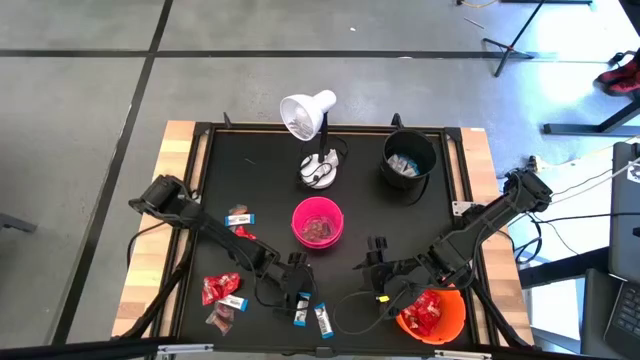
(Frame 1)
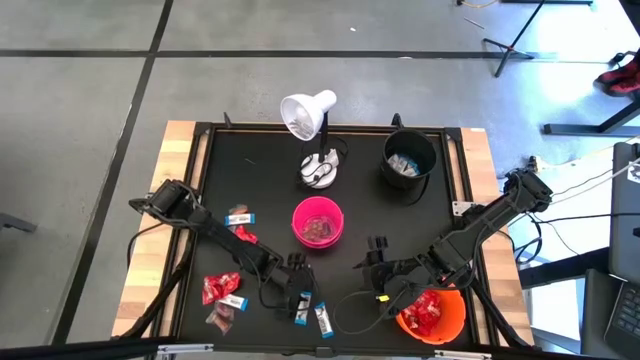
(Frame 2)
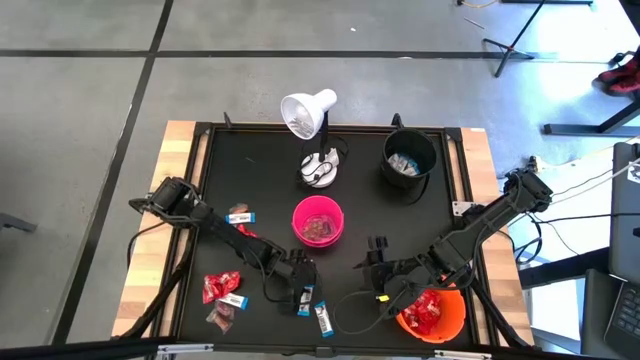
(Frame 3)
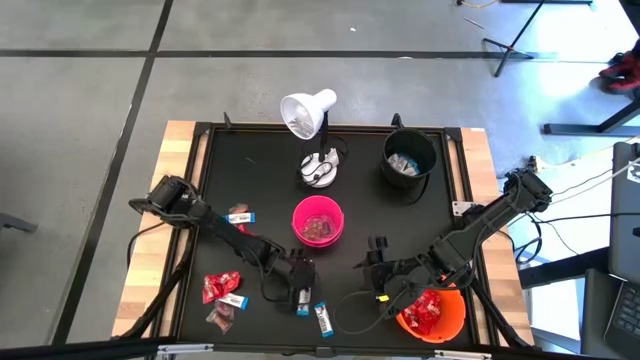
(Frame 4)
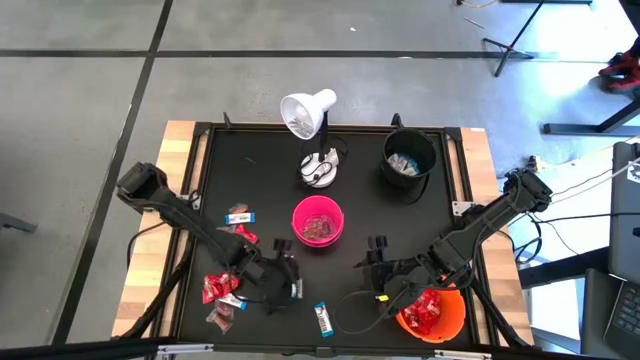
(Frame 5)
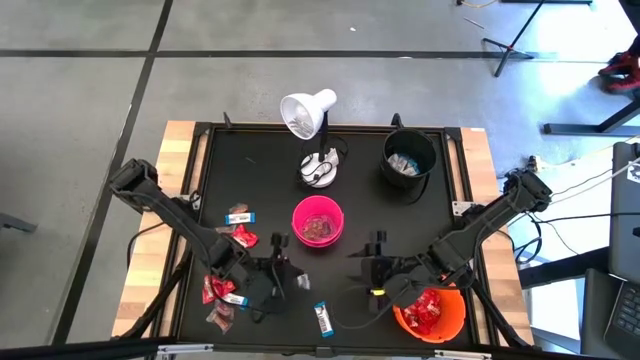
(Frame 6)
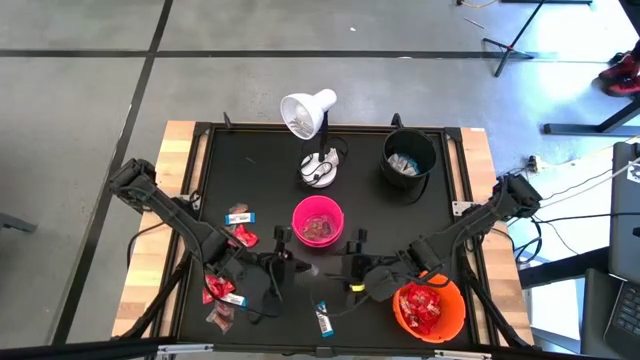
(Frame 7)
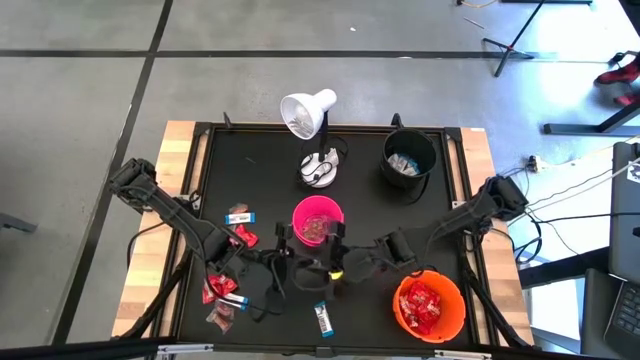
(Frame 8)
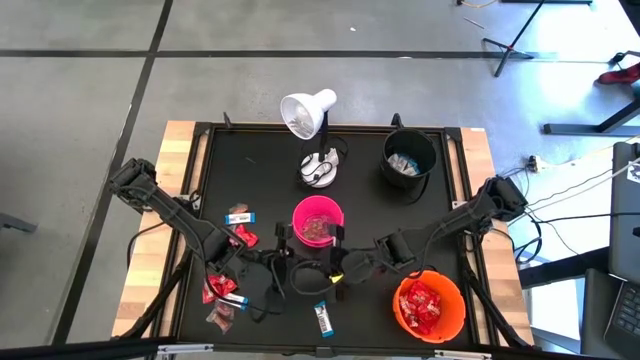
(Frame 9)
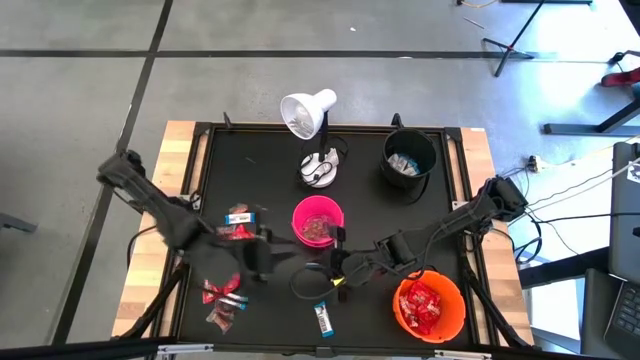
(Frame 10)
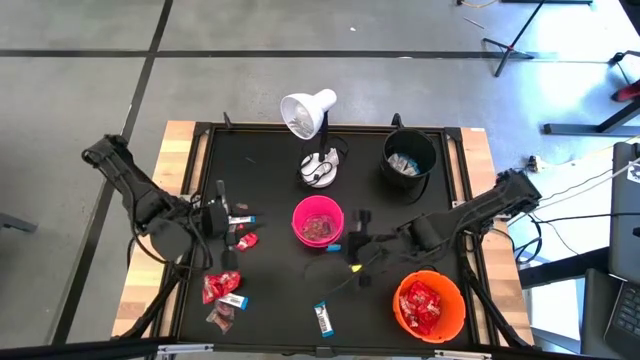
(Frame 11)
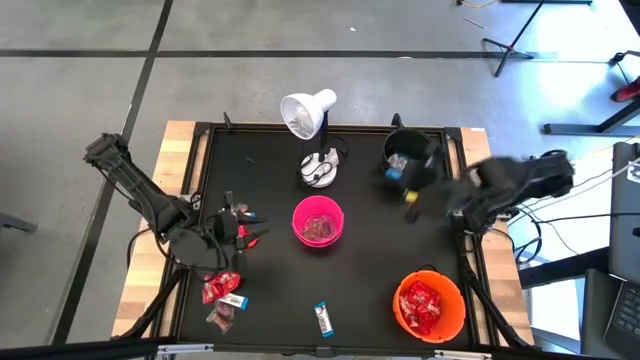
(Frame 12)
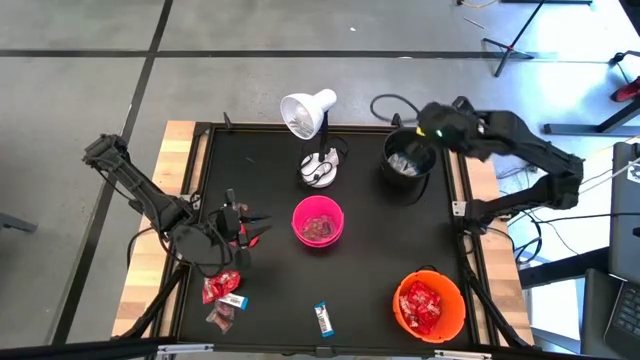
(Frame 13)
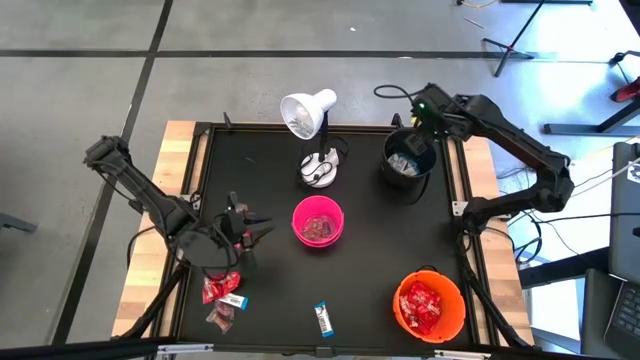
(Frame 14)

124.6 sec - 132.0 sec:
Task: Sort candy
Put the white chocolate bar into the black bucket

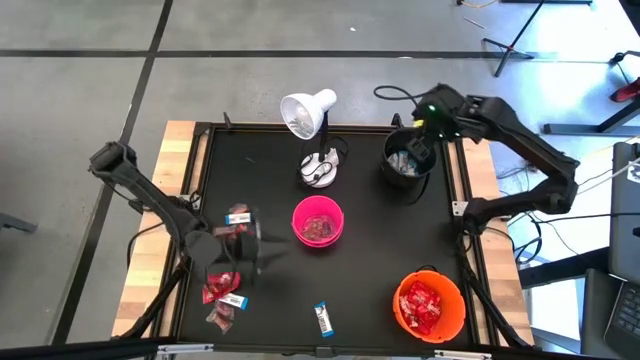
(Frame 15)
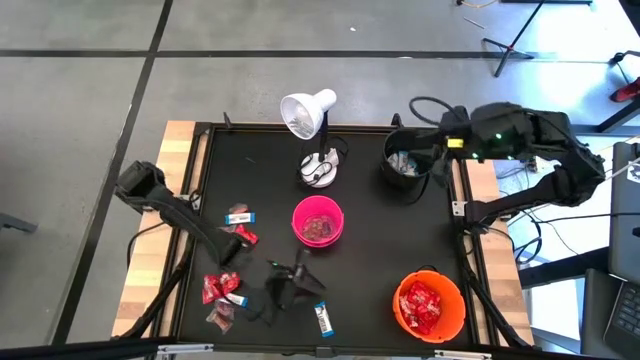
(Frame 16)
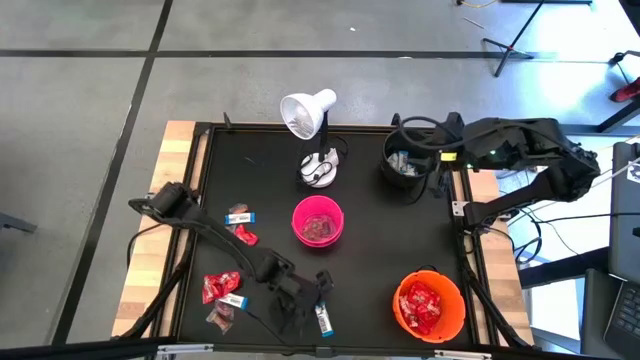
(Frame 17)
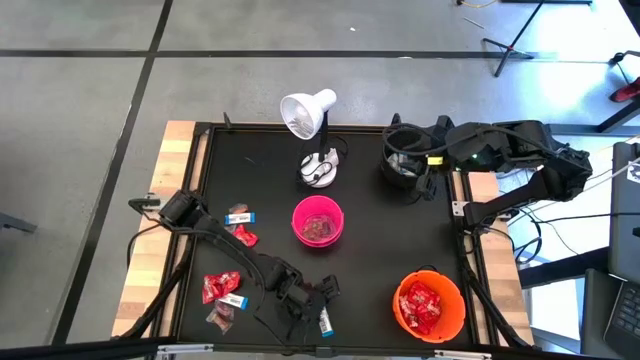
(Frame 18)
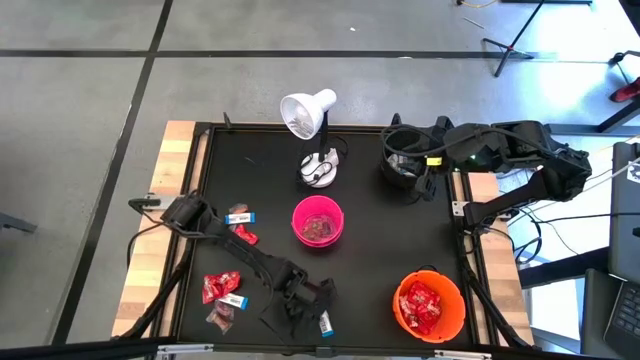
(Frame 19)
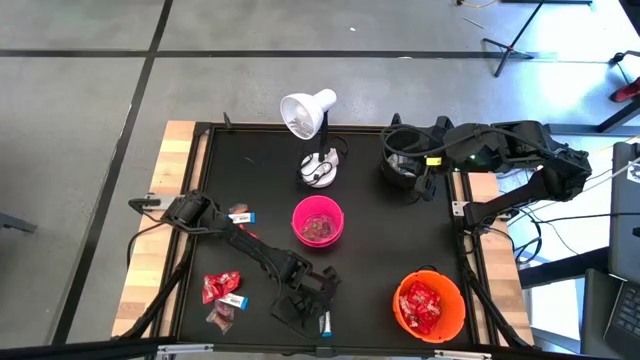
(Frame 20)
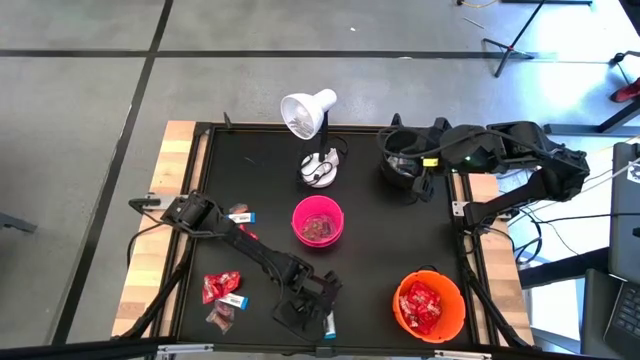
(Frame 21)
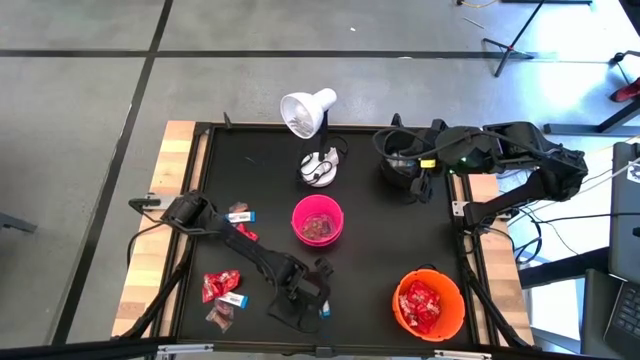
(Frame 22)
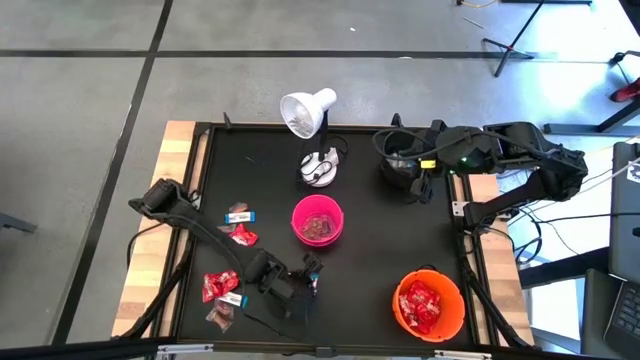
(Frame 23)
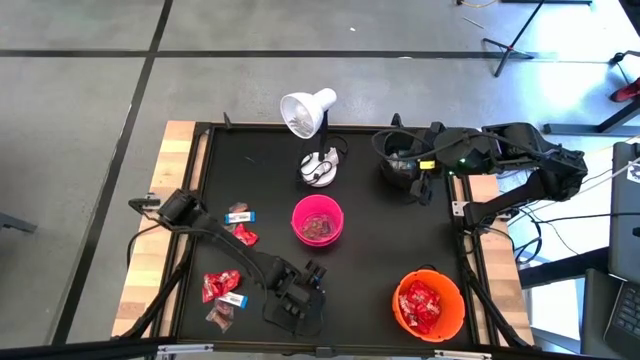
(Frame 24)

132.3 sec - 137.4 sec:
Put the white chocolate bar into the black bucket

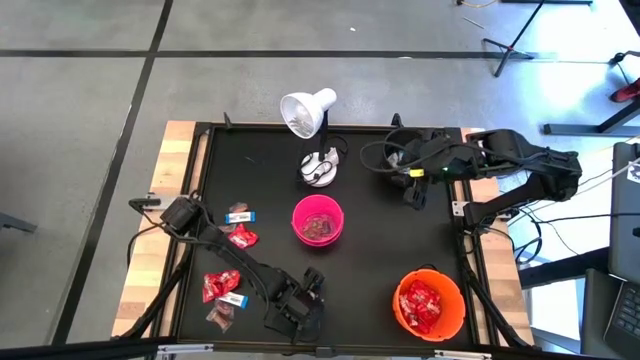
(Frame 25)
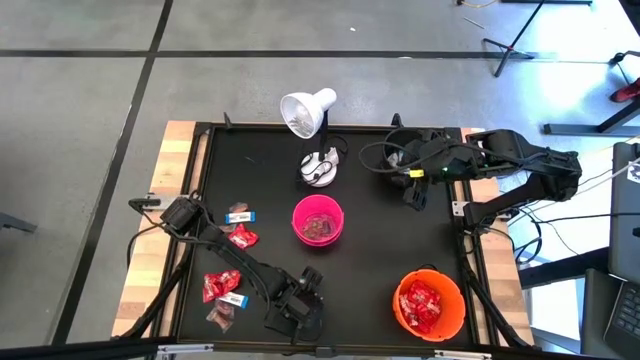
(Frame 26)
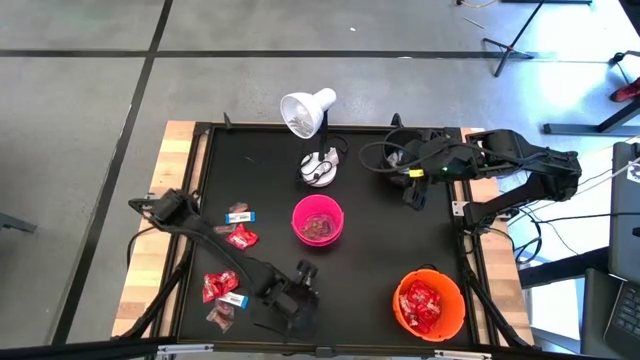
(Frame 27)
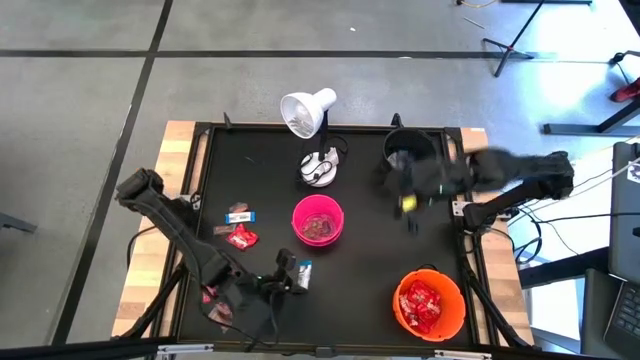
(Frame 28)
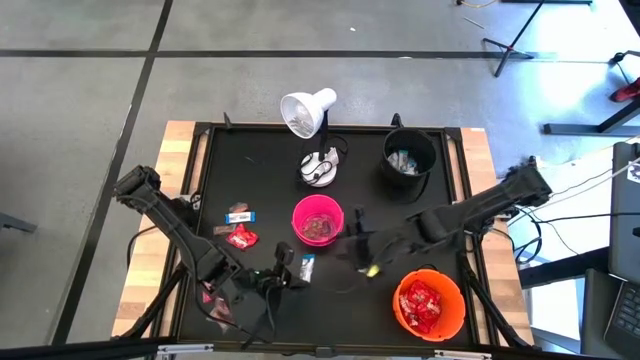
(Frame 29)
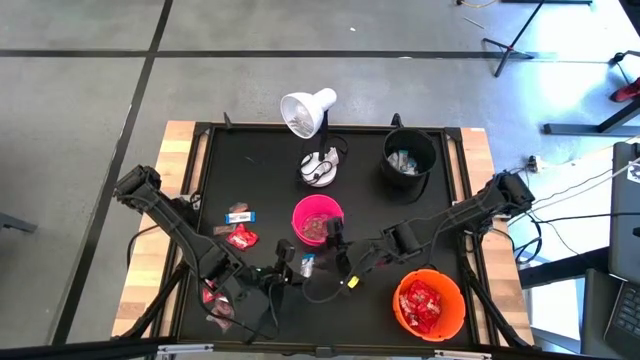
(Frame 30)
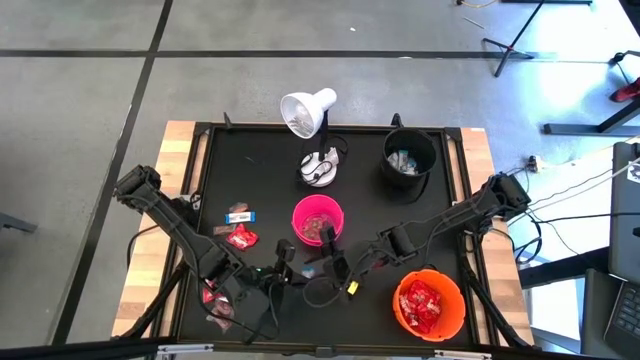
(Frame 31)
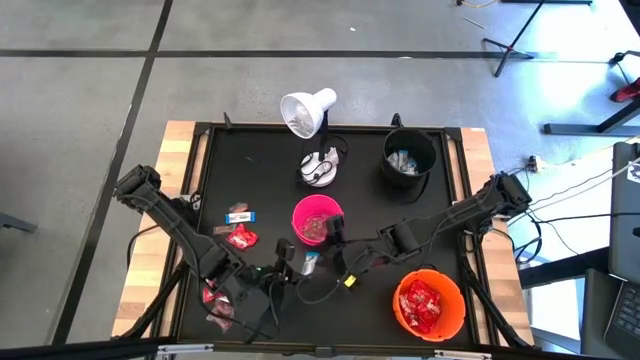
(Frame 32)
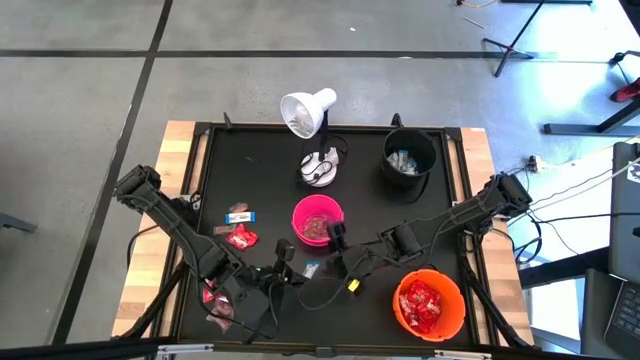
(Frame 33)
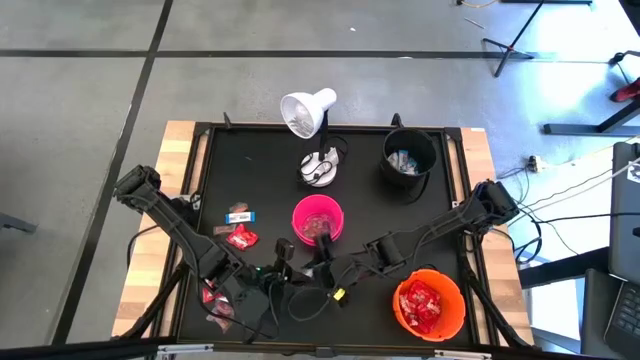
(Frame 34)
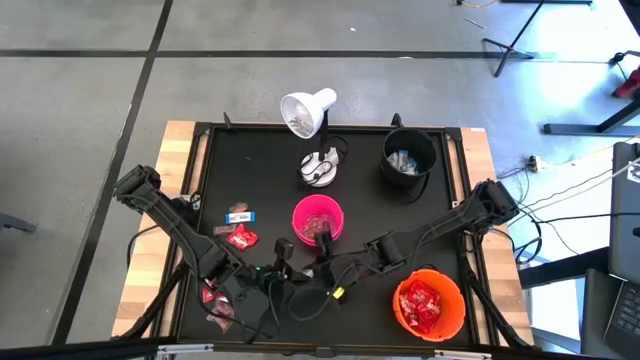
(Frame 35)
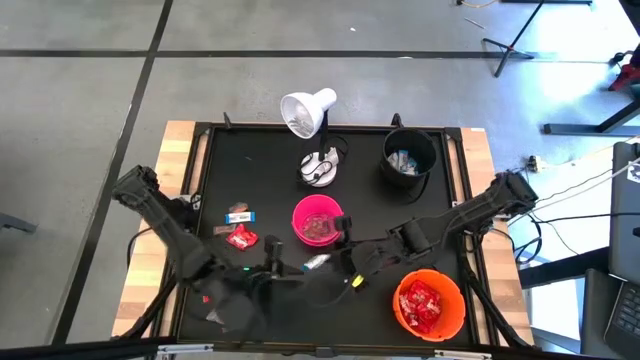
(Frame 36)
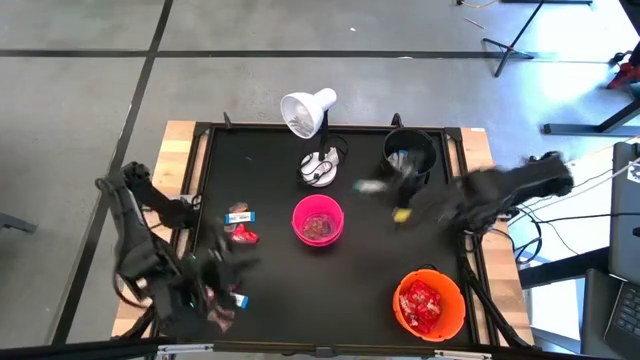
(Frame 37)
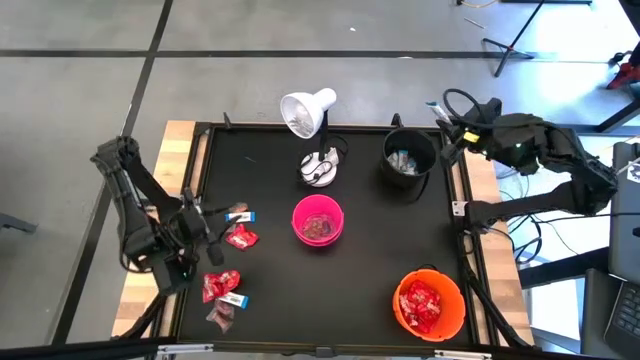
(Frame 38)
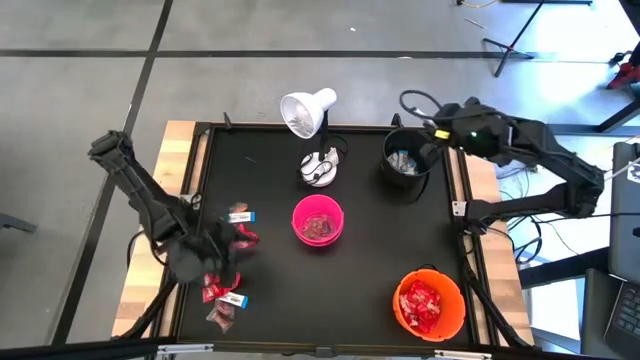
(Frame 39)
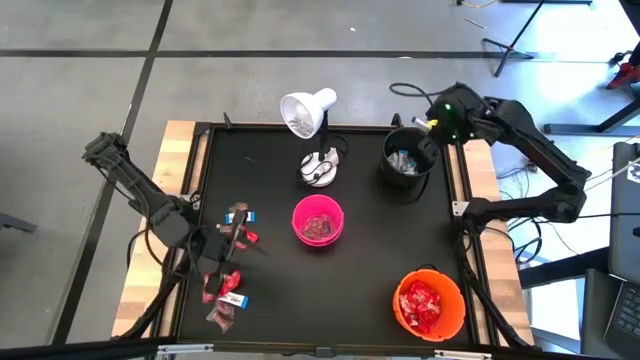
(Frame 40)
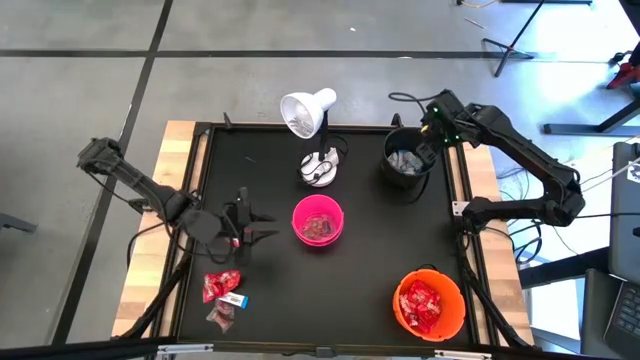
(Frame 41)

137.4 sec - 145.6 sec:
Put the white chocolate bar into the black bucket

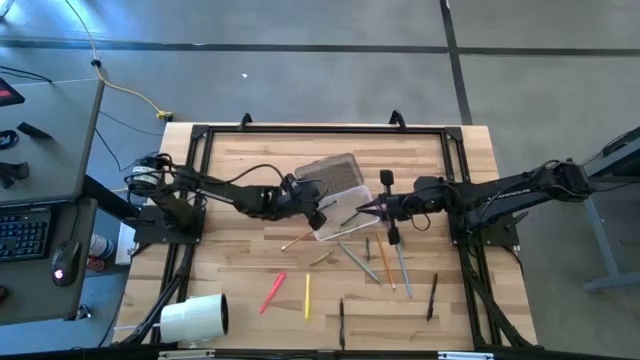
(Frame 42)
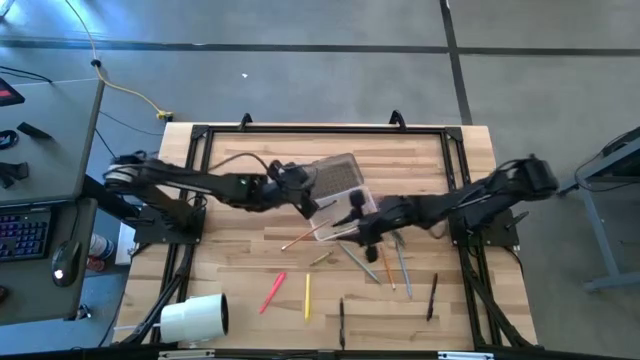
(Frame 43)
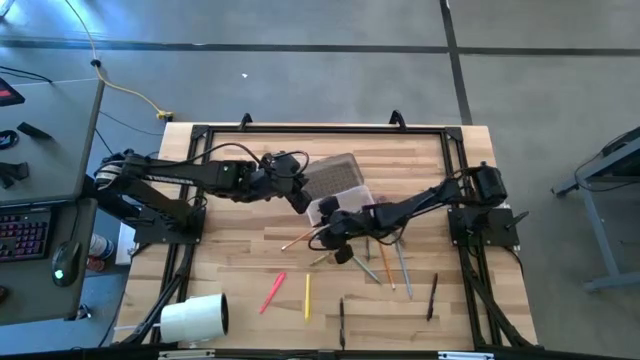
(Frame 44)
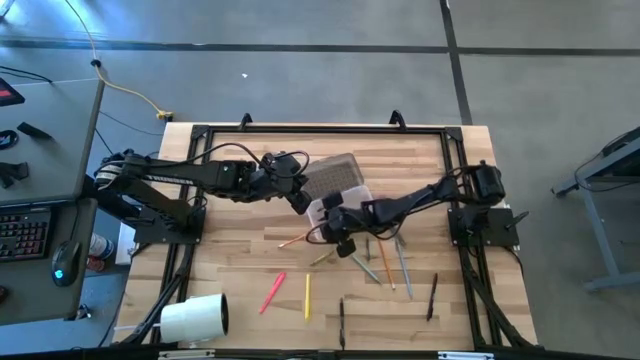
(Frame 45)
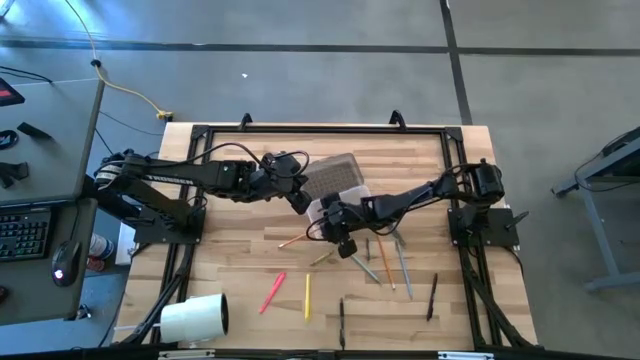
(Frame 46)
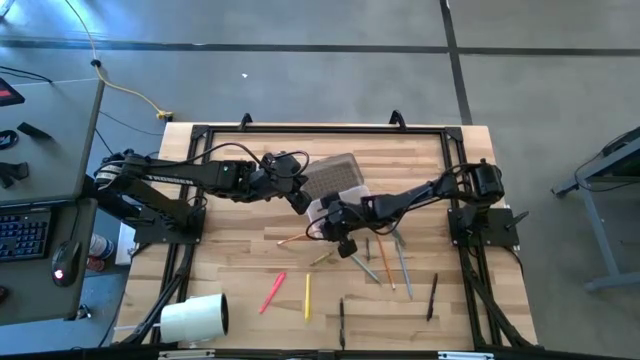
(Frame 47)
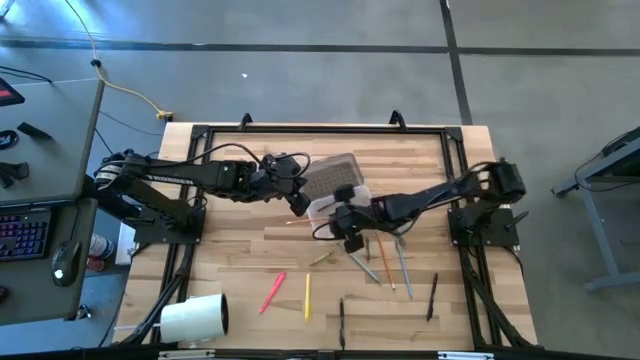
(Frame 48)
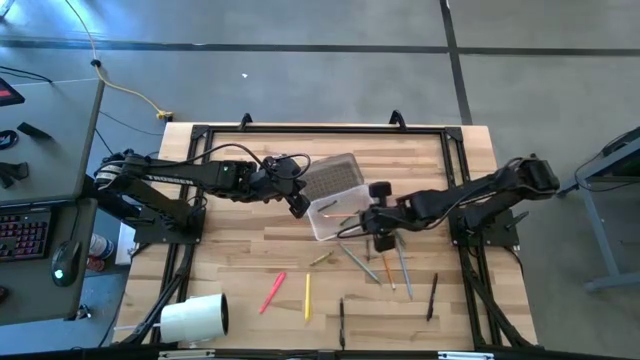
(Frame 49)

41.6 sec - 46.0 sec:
Task: Pick & place school supplies into a supply box
Put the orange pencil into the black supply box
